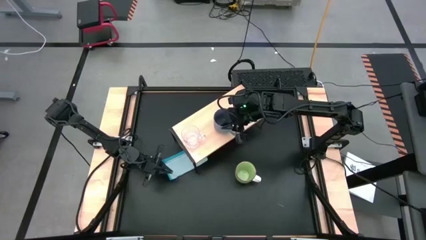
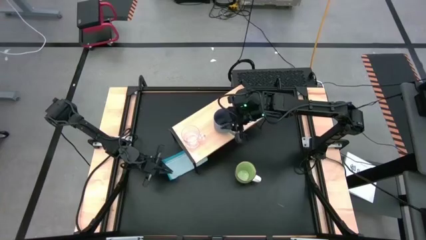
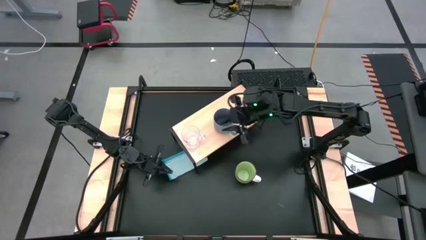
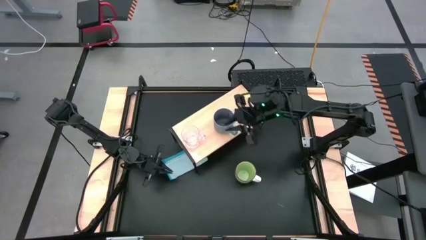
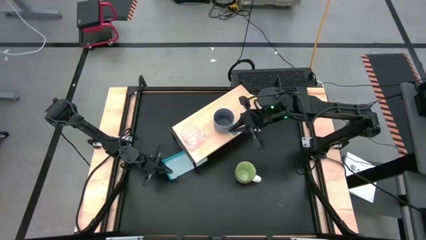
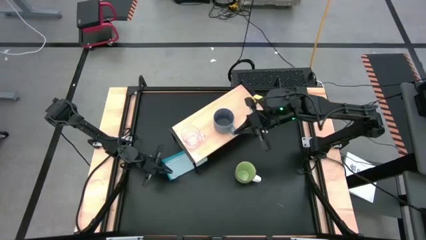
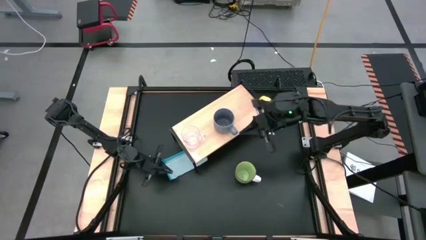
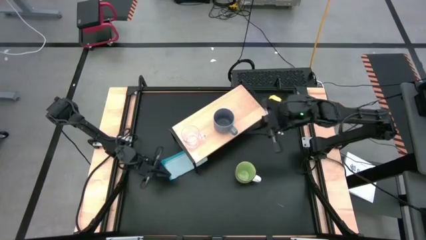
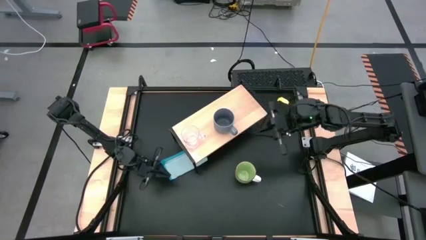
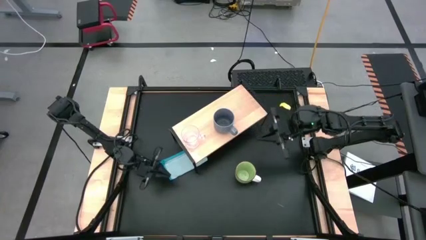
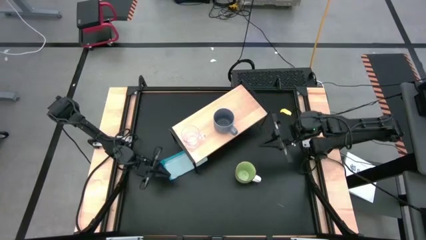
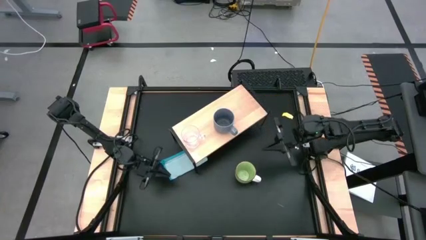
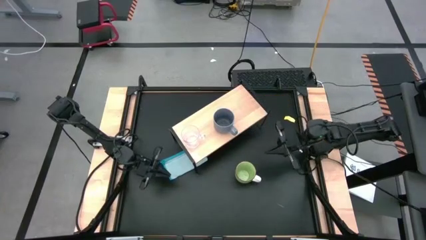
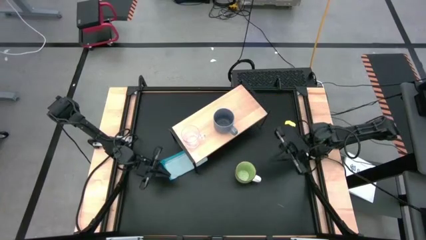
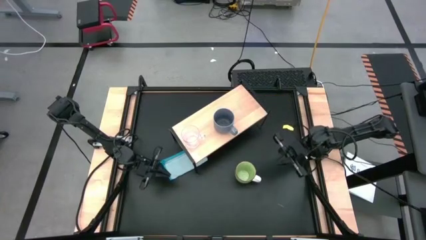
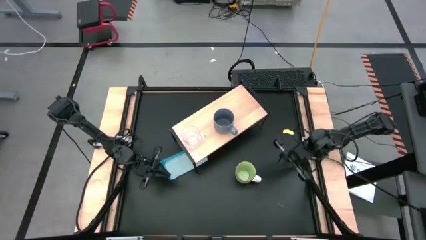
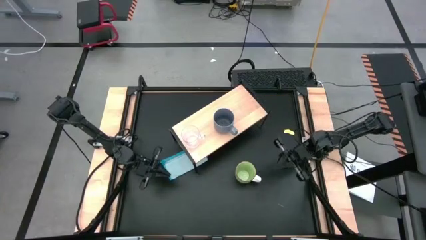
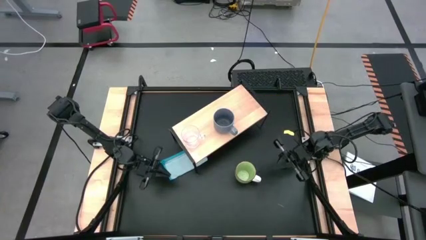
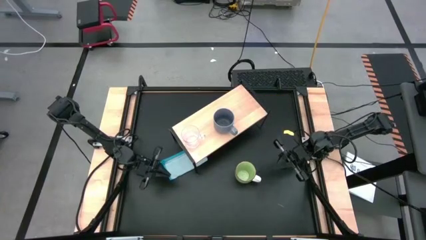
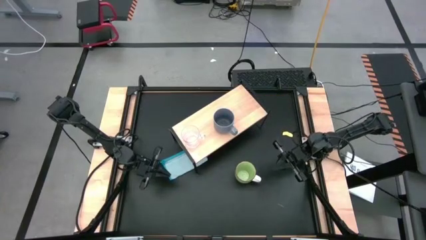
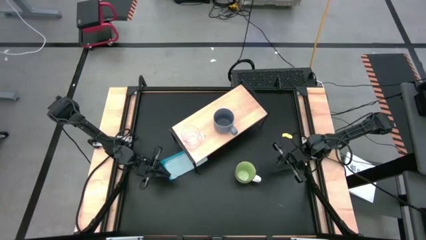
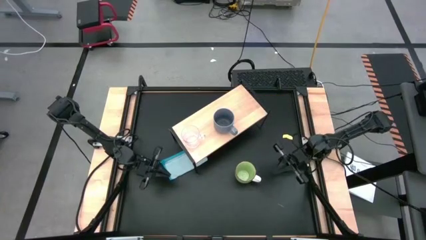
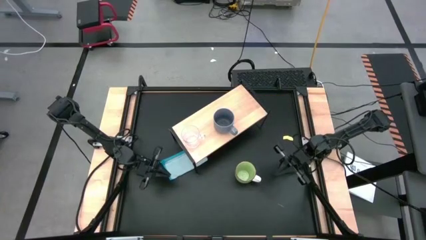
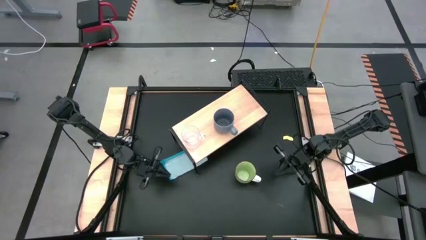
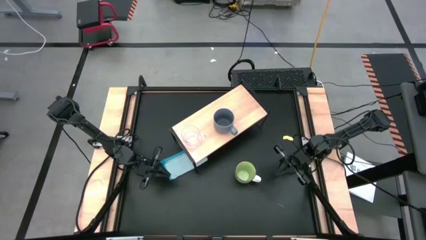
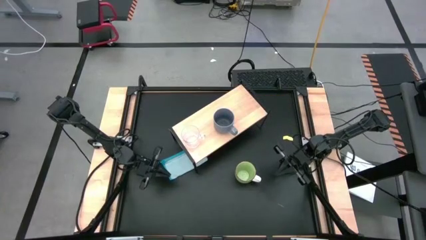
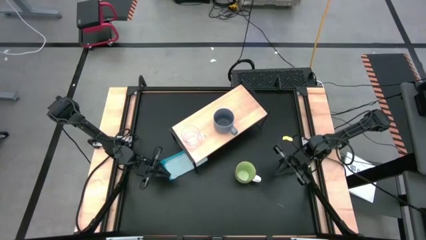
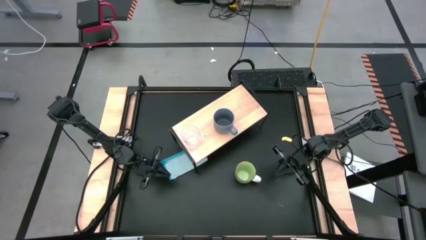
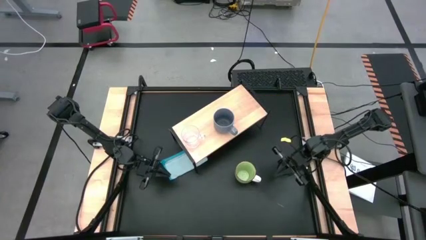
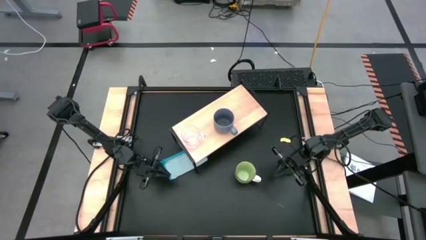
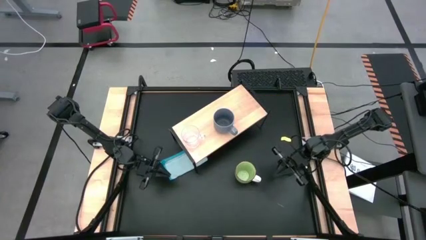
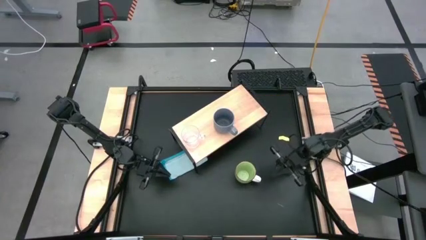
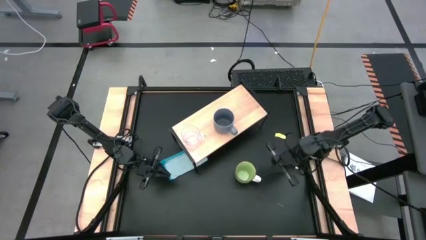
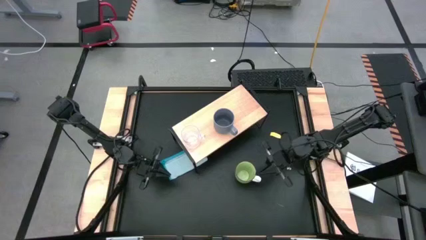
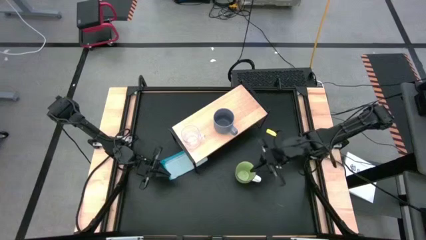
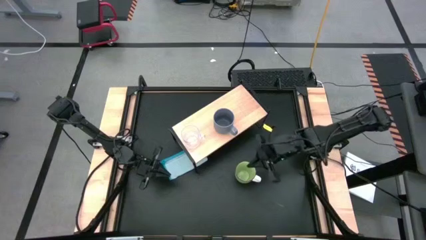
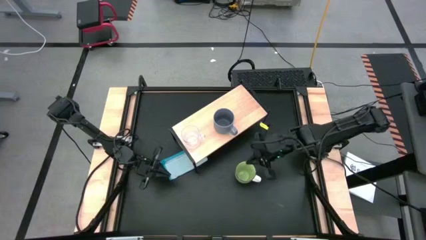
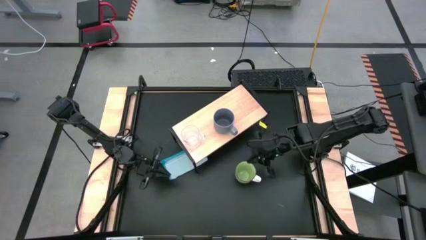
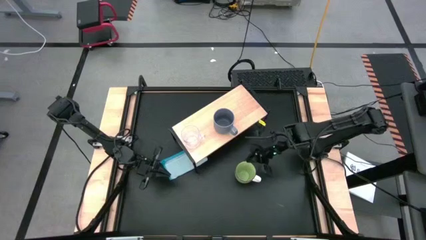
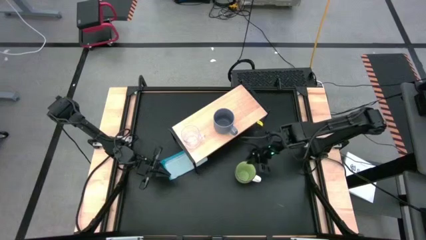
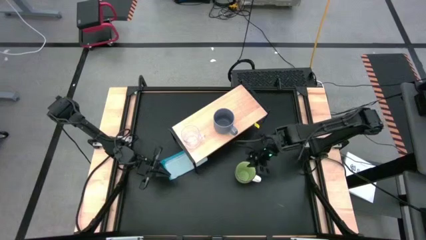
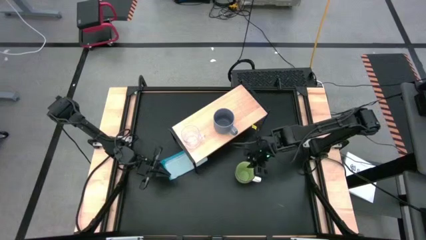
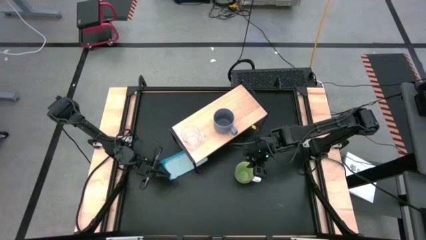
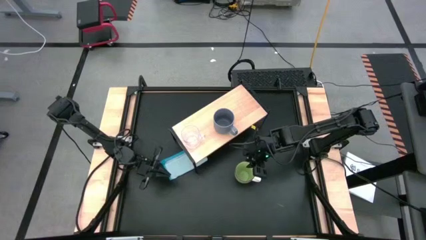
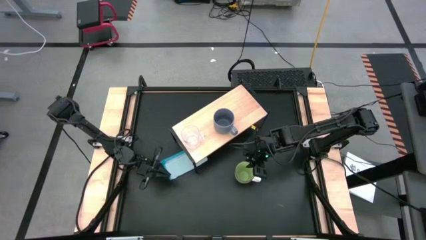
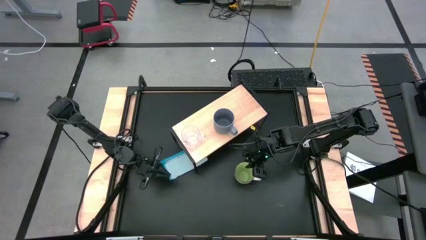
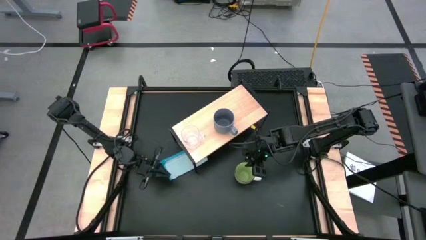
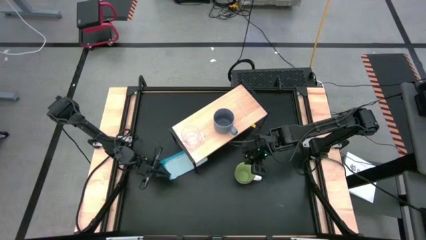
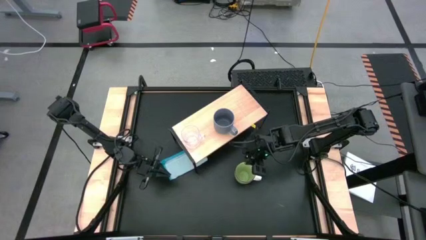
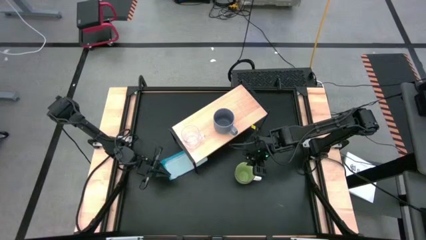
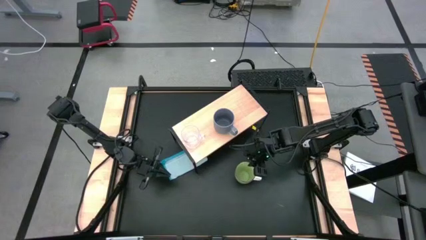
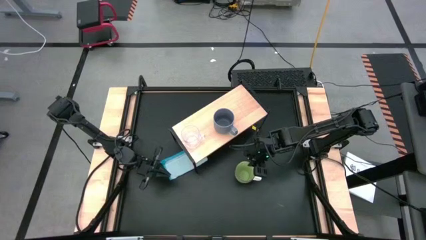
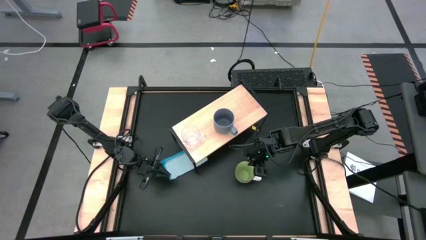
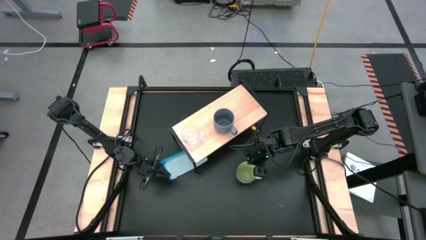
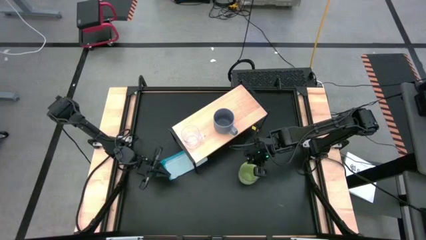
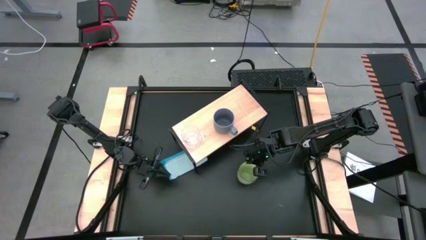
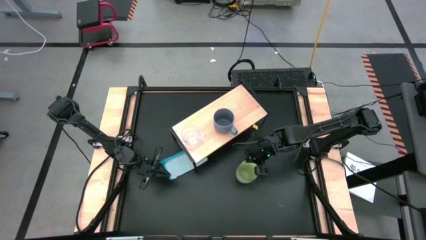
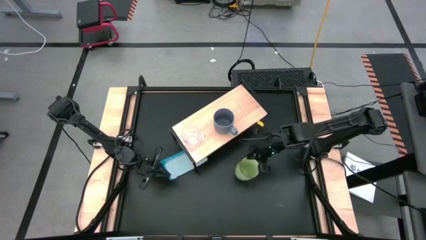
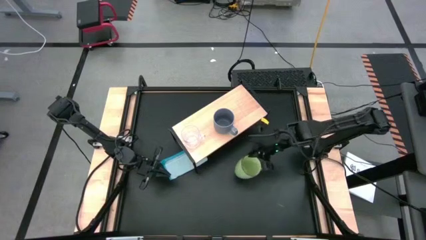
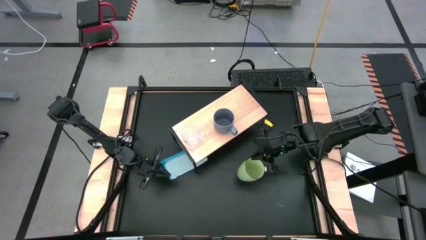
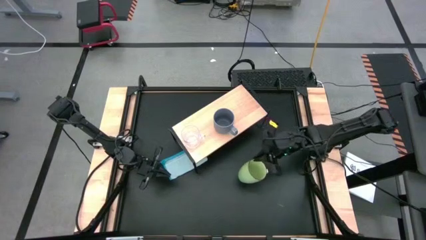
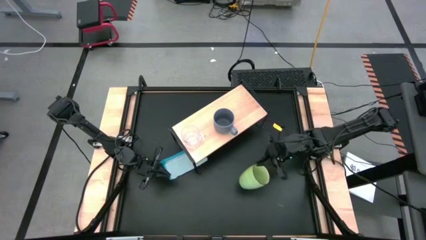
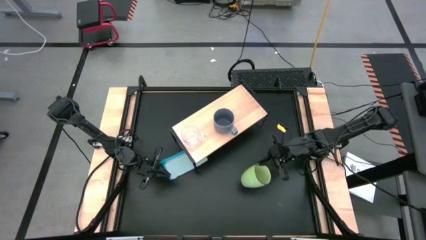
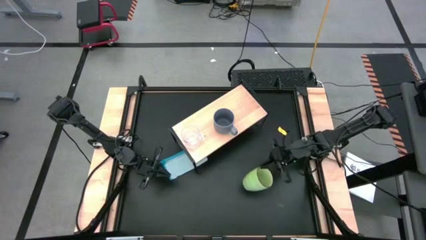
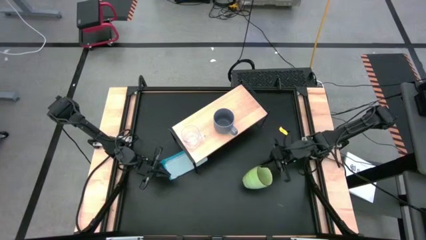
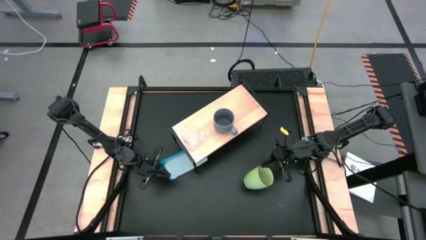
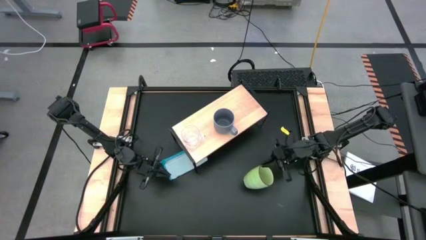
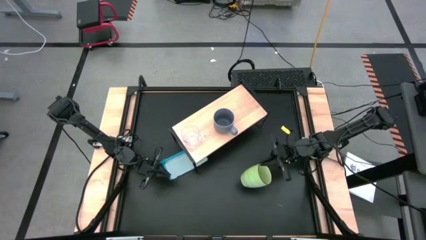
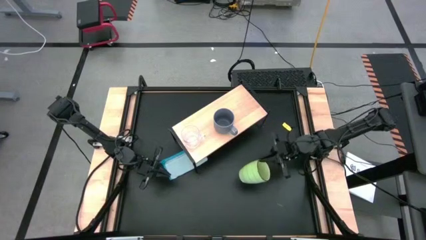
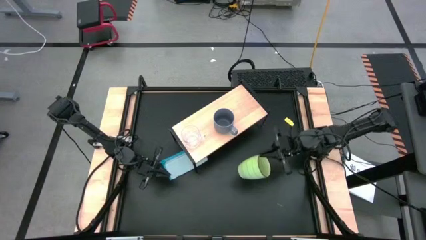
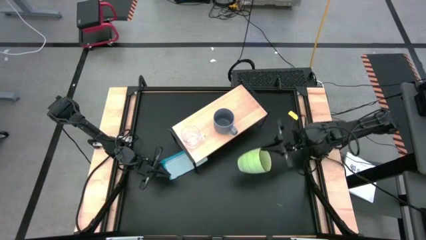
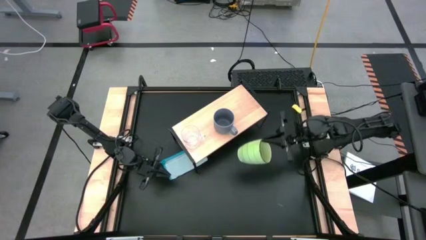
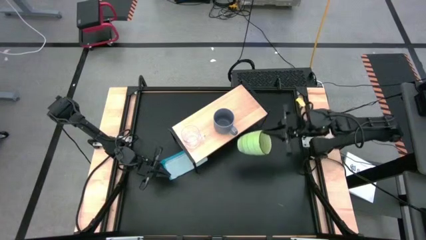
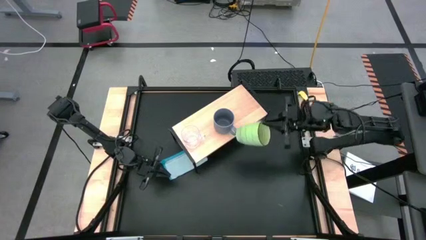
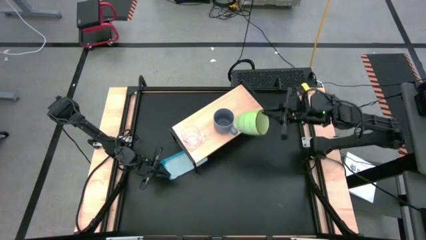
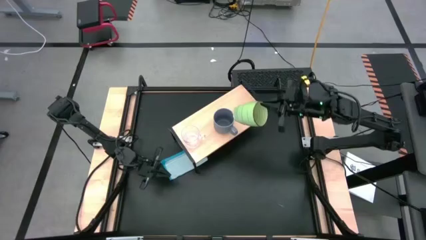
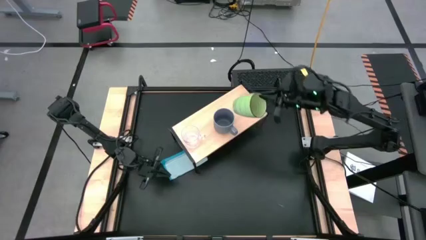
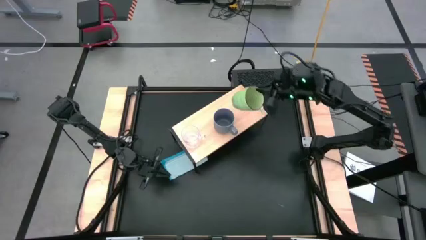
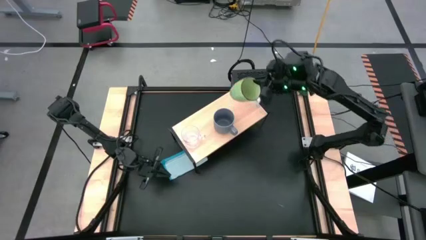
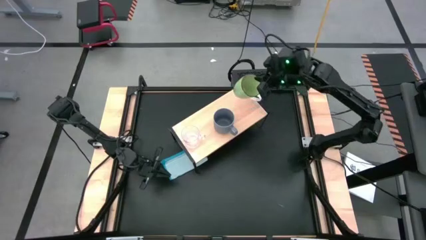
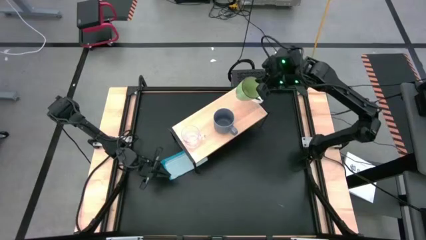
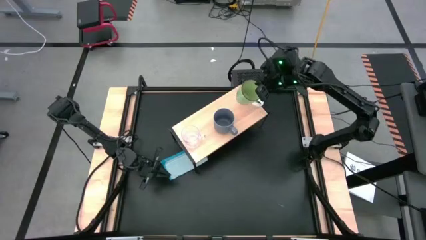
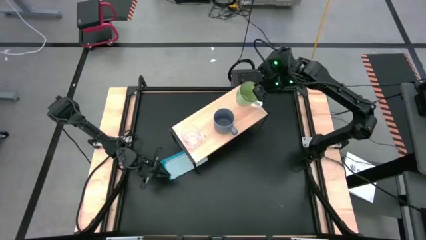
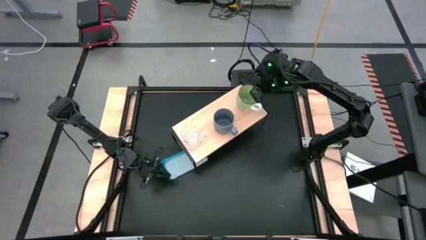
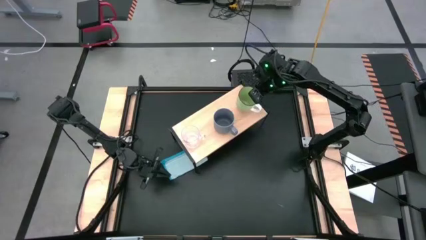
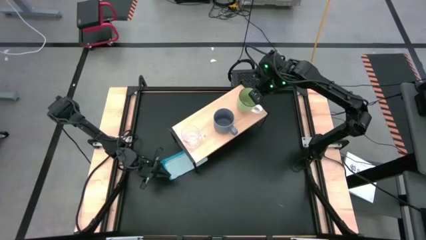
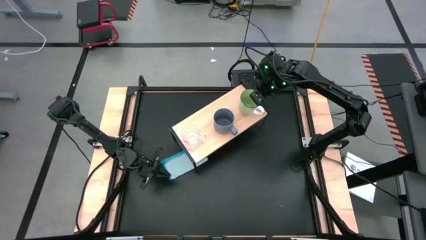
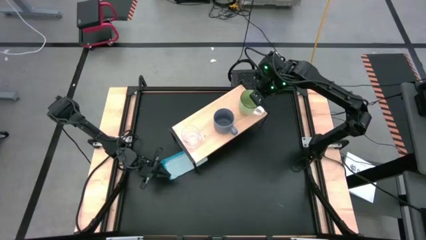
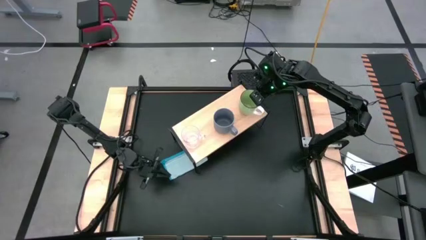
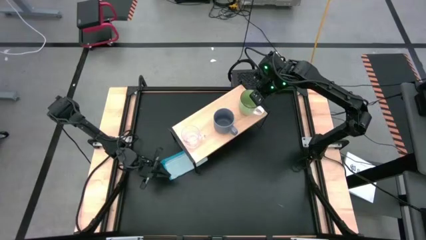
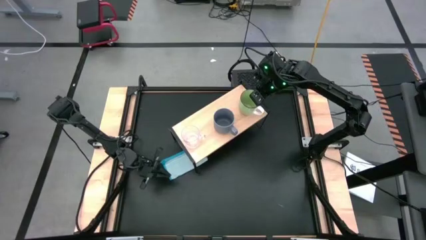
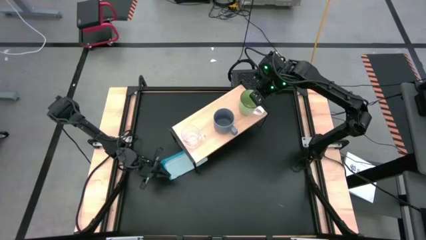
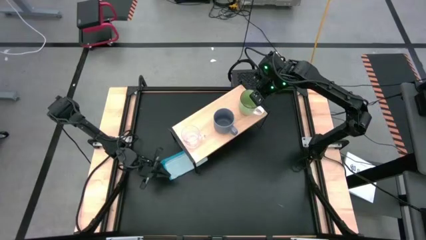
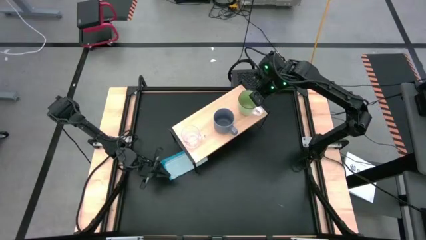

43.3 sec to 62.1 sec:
Task: Stack small to large cups/mugs on shelf
Put the green mug on the shelf
